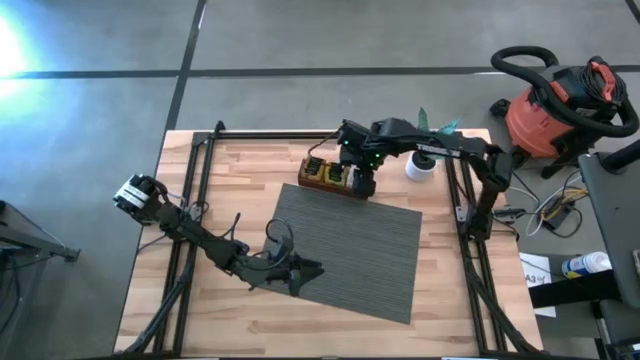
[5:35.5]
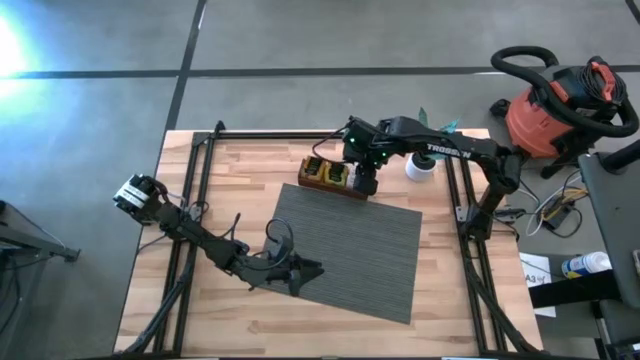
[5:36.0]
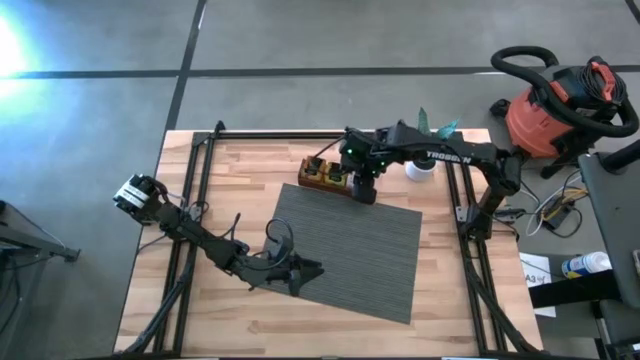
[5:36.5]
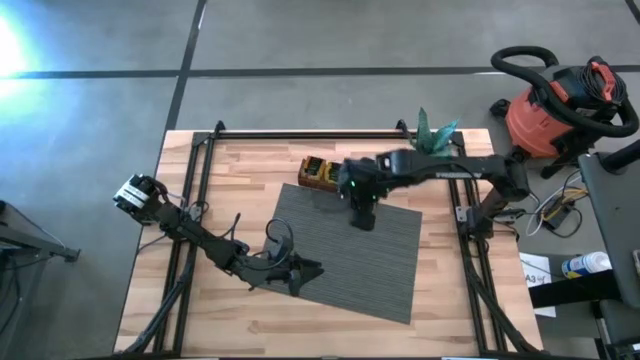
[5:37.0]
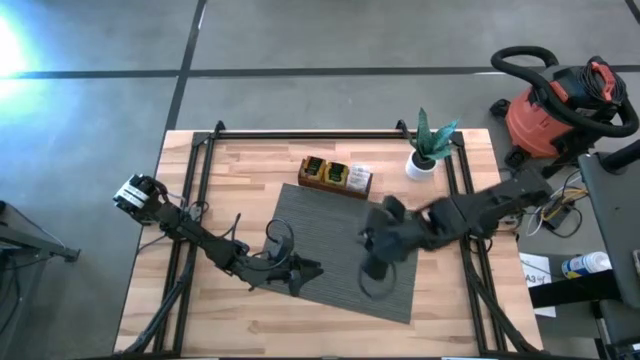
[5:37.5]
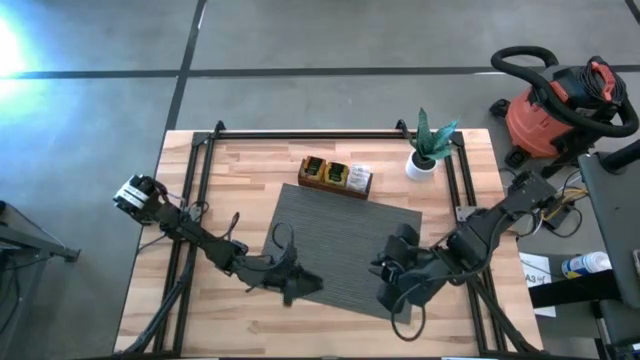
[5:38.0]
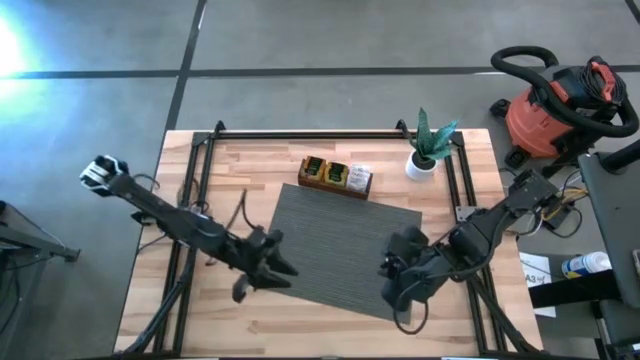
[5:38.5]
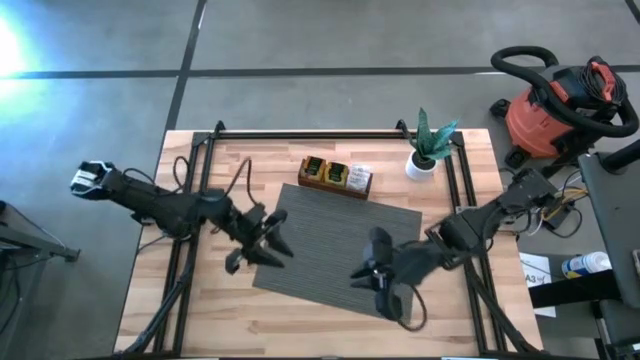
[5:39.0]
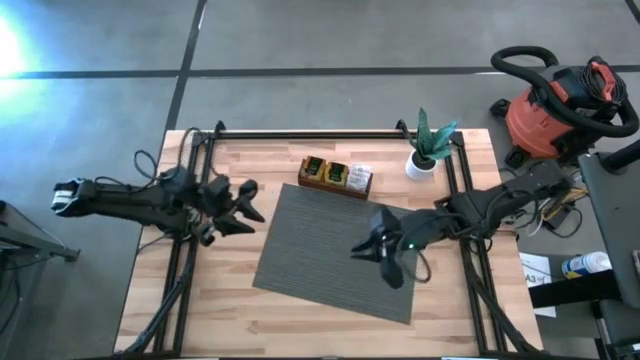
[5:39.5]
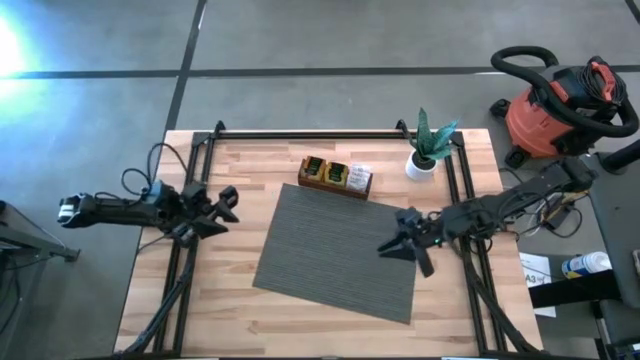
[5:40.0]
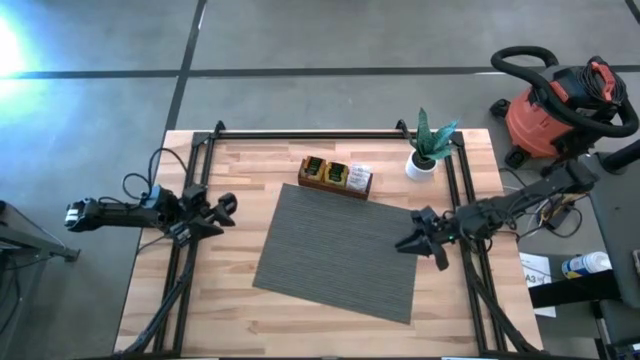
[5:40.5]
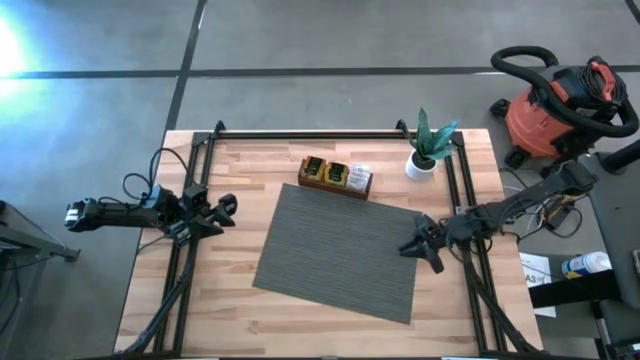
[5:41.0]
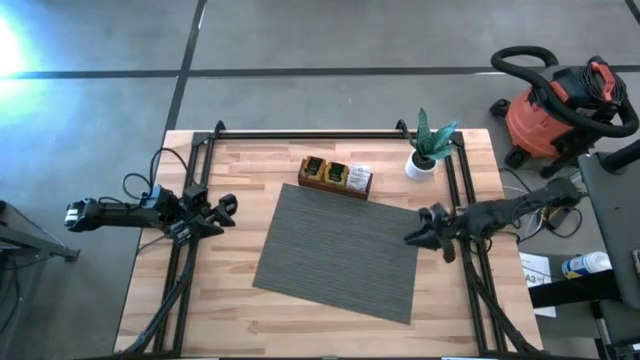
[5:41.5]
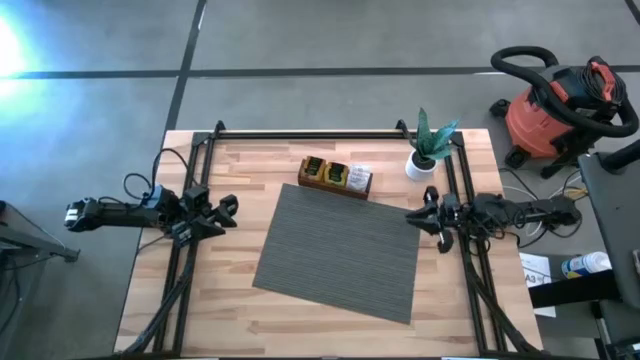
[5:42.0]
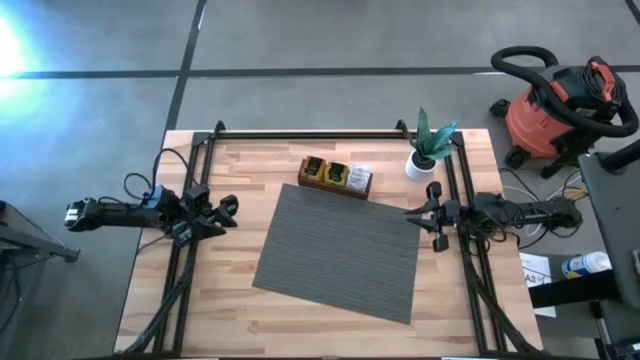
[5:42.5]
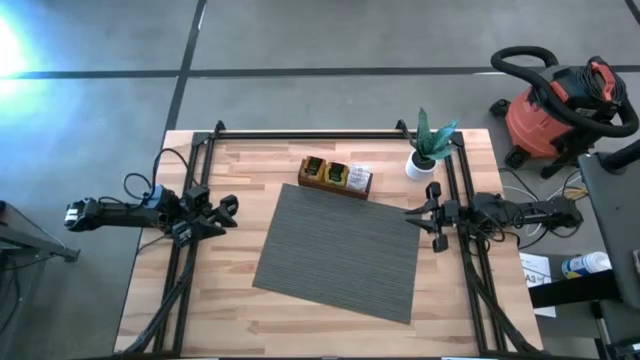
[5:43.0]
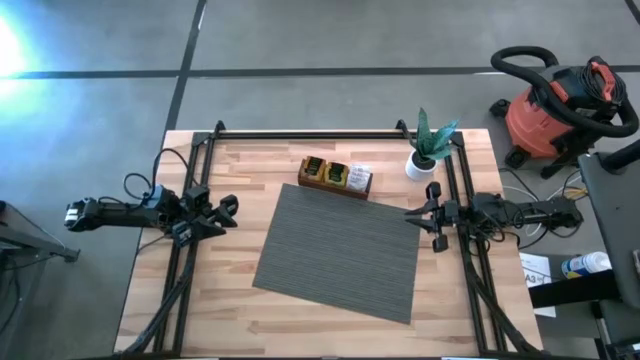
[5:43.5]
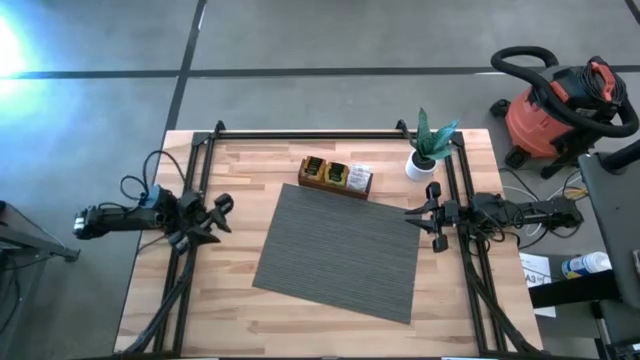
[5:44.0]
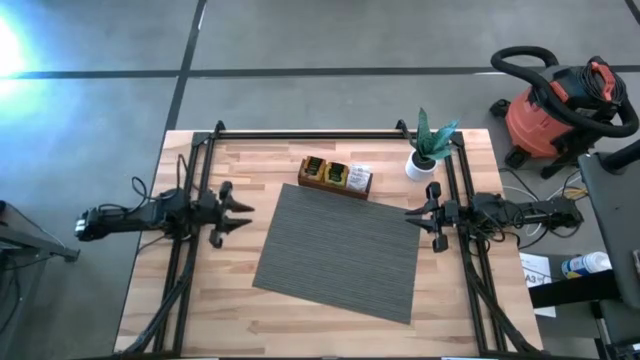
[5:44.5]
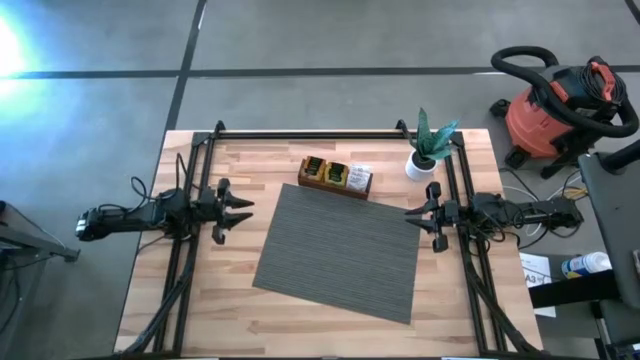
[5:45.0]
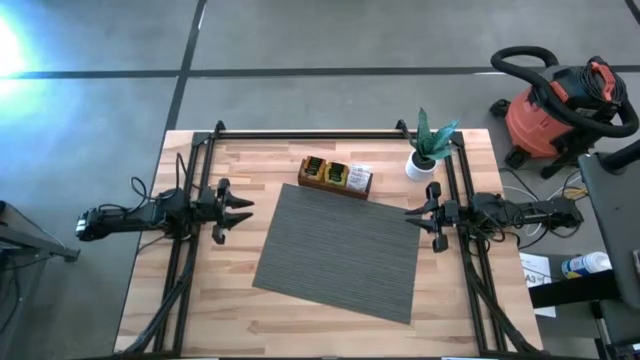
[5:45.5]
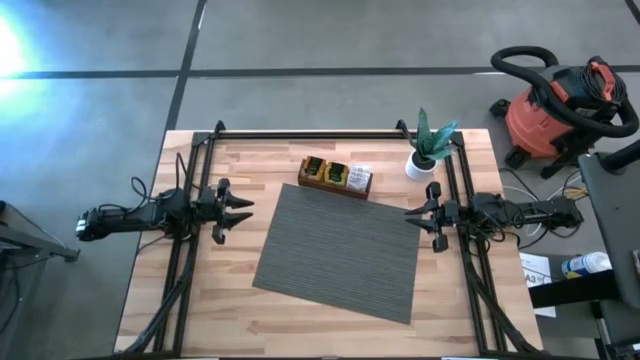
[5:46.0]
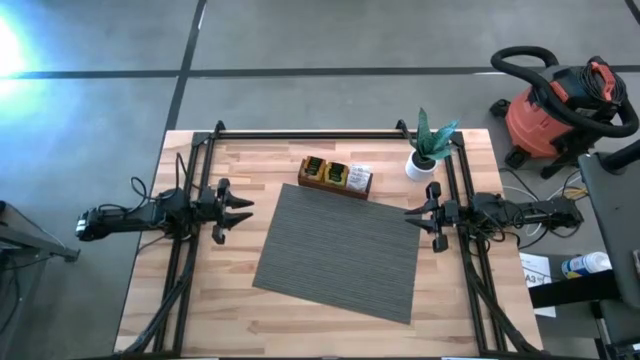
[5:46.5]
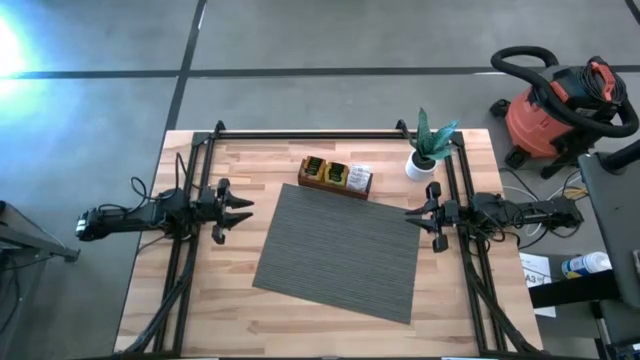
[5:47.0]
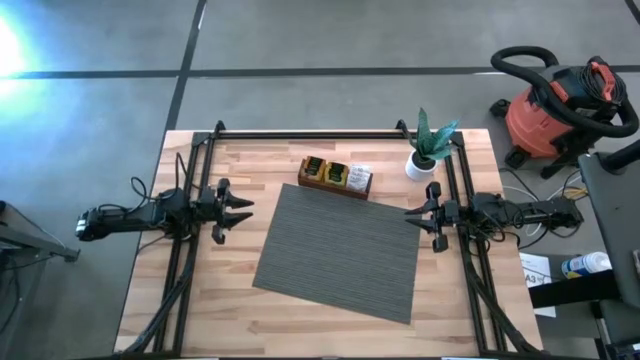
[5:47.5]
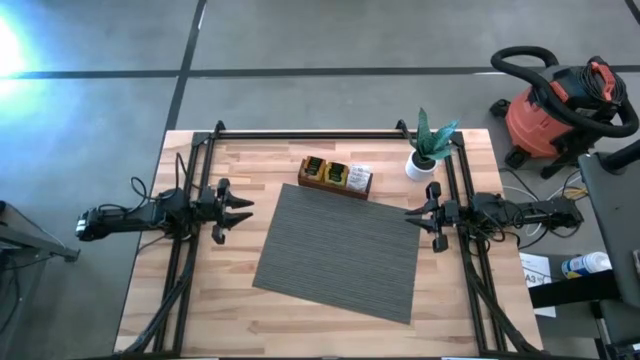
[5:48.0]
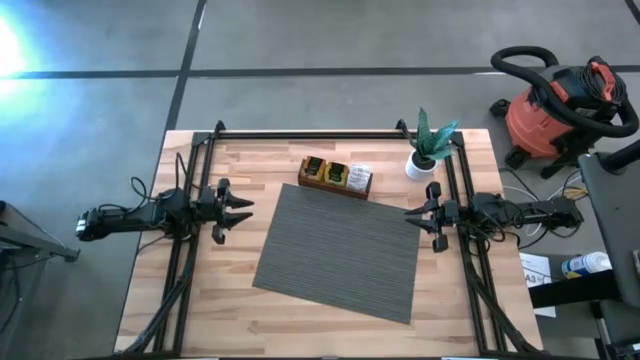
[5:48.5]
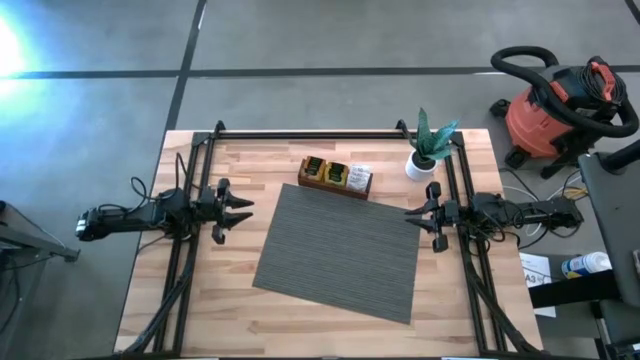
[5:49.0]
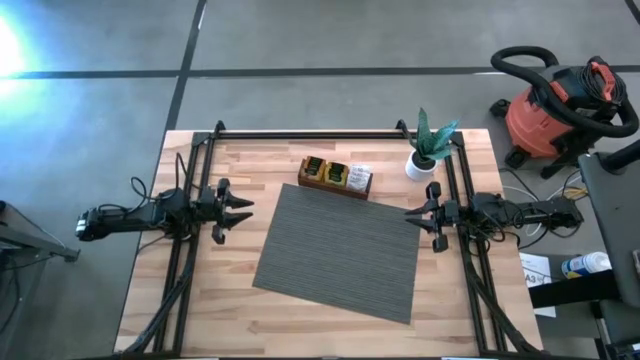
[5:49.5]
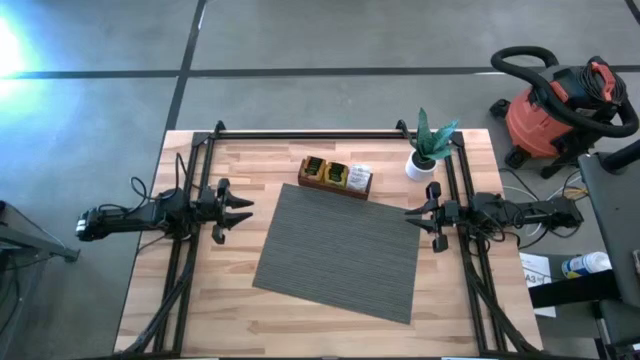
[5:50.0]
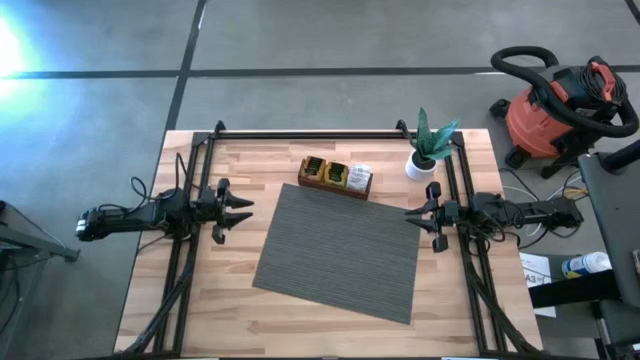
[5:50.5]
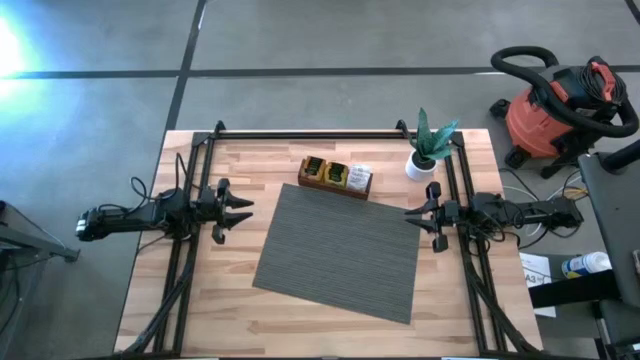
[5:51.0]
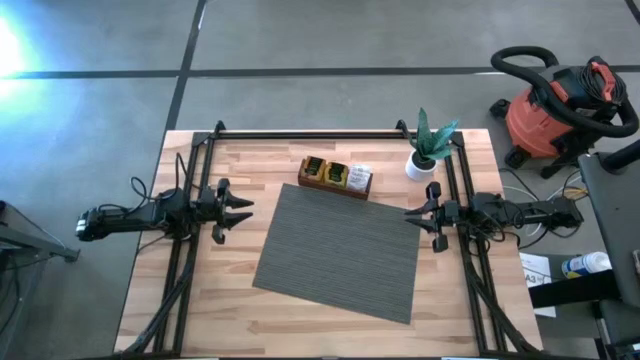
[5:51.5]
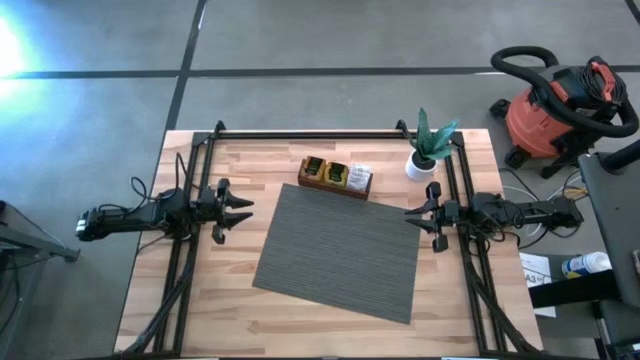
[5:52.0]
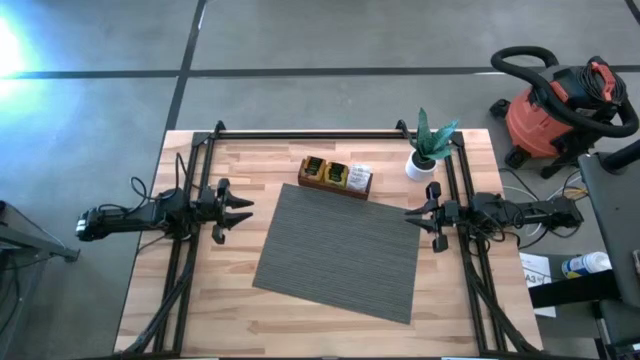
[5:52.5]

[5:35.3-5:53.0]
Task: Pick & Place Tea
Return to Home Position

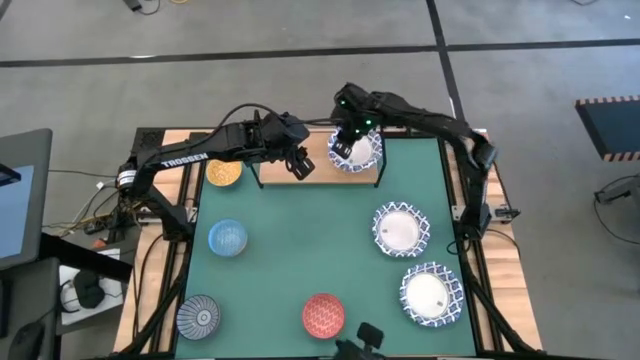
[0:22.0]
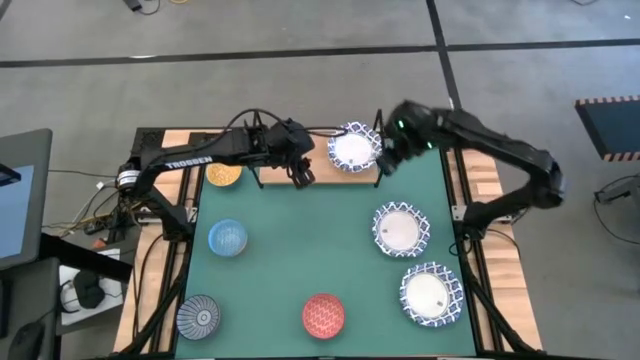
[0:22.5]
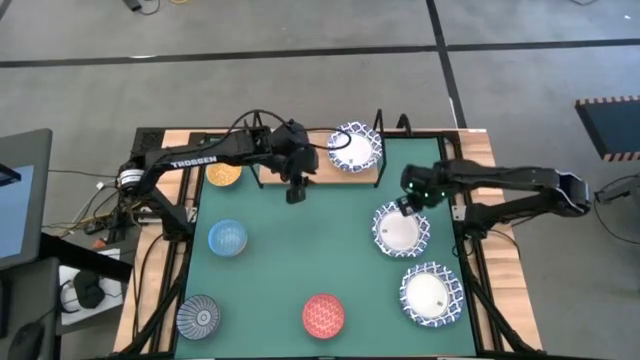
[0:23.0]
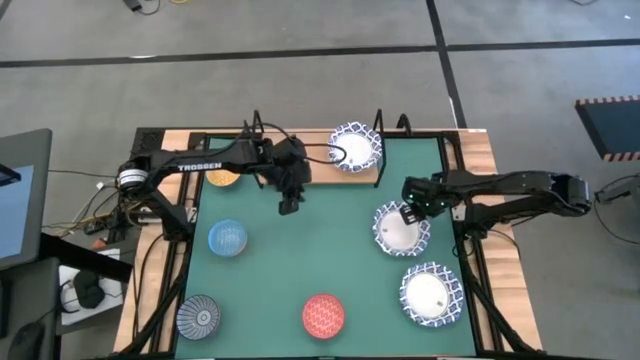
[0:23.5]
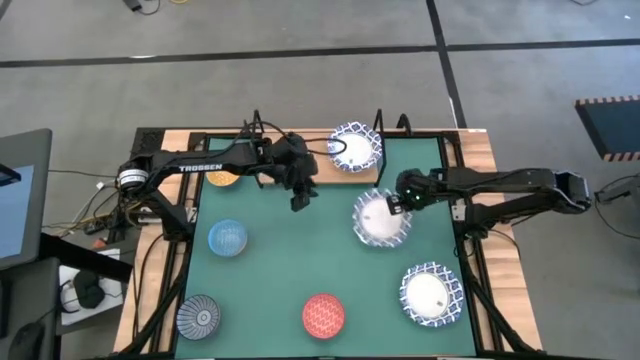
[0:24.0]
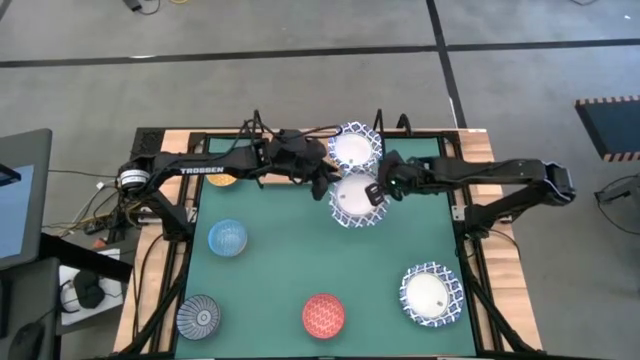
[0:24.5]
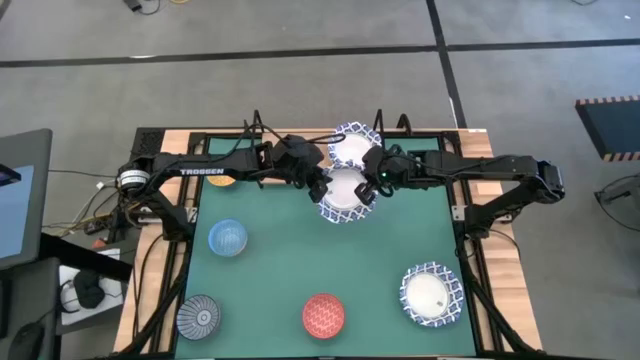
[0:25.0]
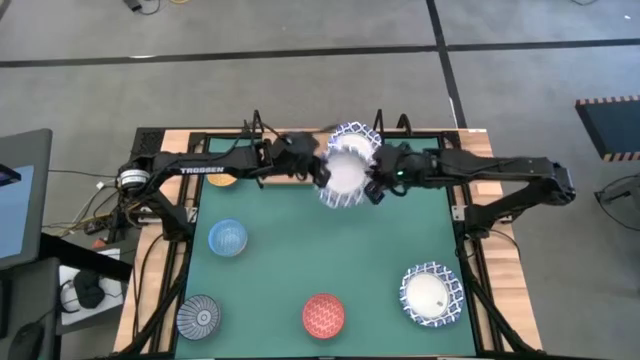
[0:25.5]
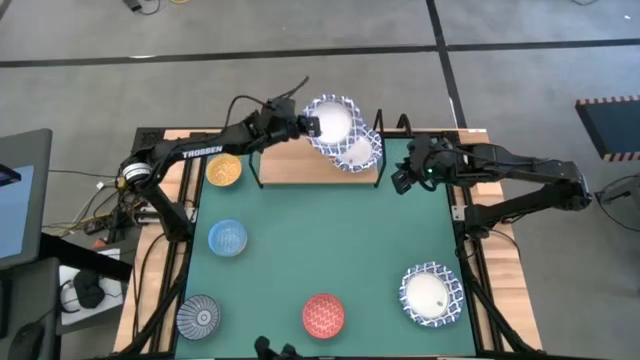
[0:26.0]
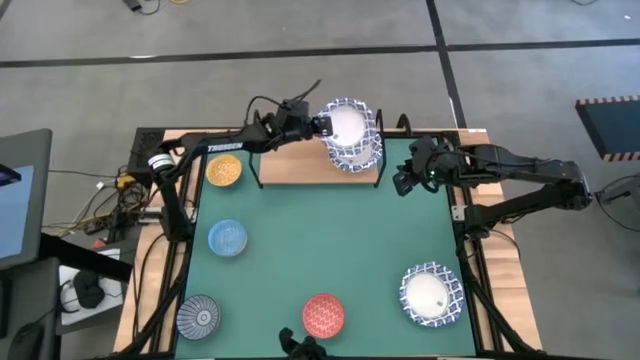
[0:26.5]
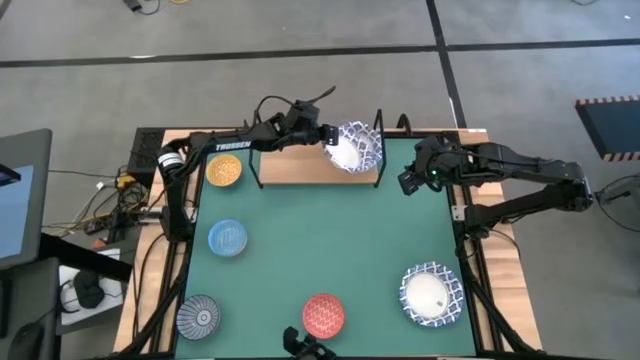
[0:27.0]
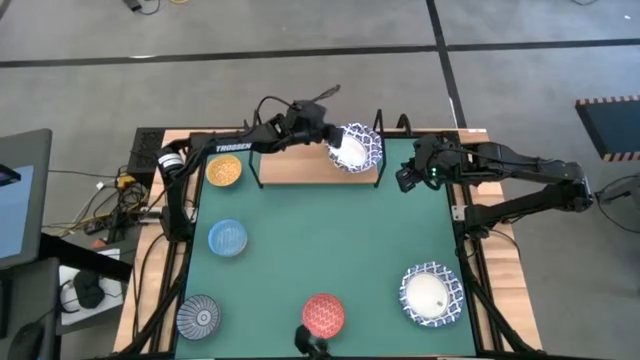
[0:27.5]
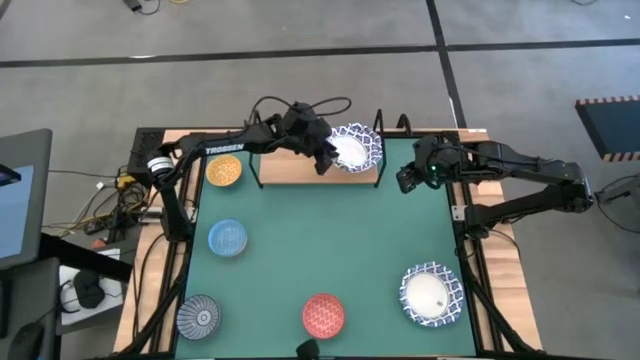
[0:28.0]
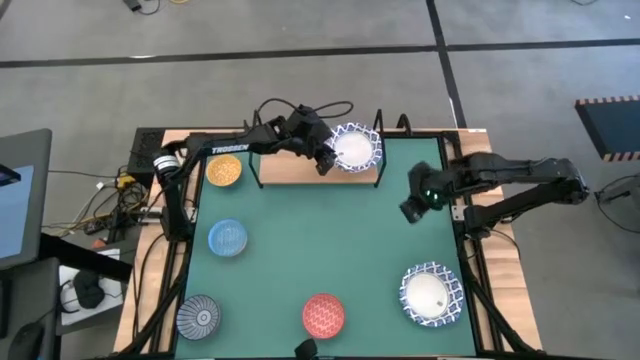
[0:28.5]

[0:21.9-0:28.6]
Task: Place and stack bowls onto a shelf
Stack the white bowl on top of the other white bowl on the shelf
